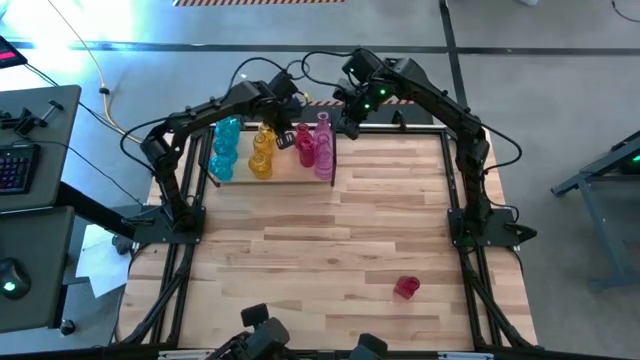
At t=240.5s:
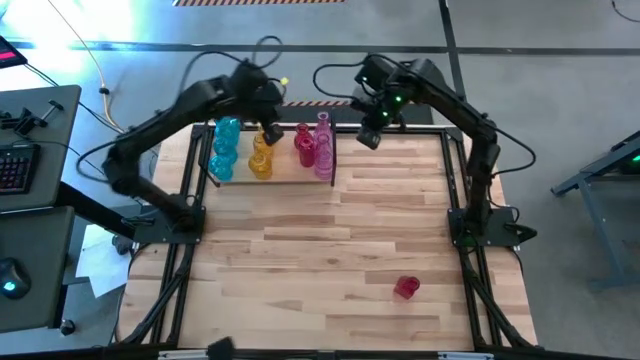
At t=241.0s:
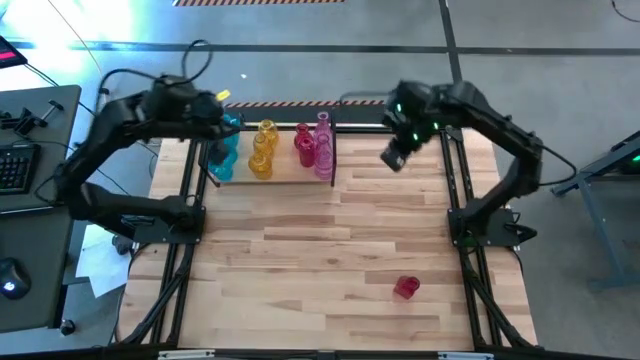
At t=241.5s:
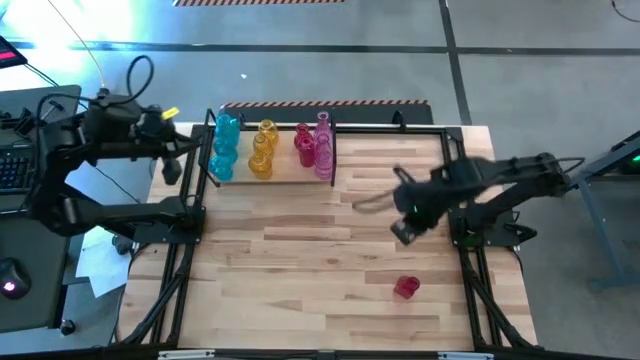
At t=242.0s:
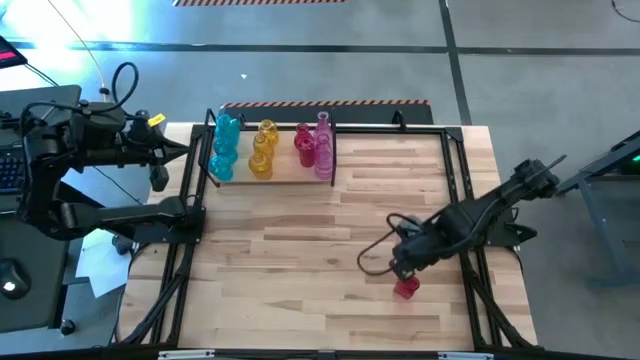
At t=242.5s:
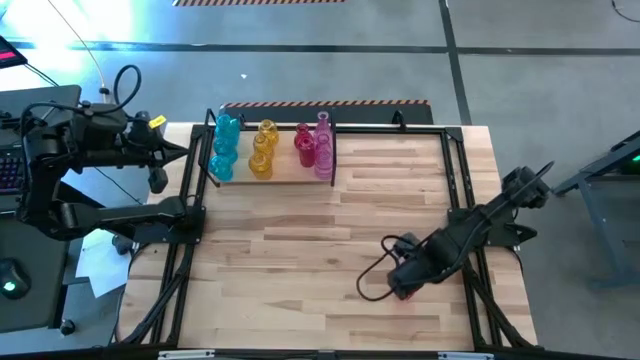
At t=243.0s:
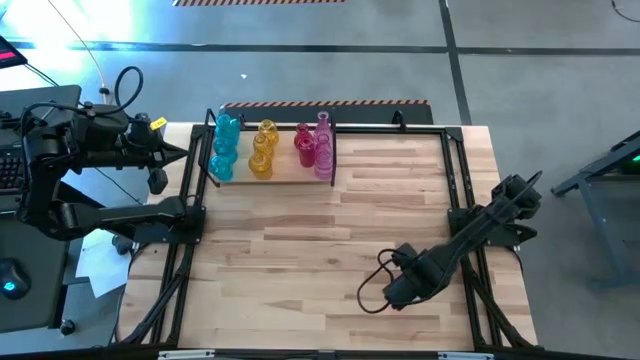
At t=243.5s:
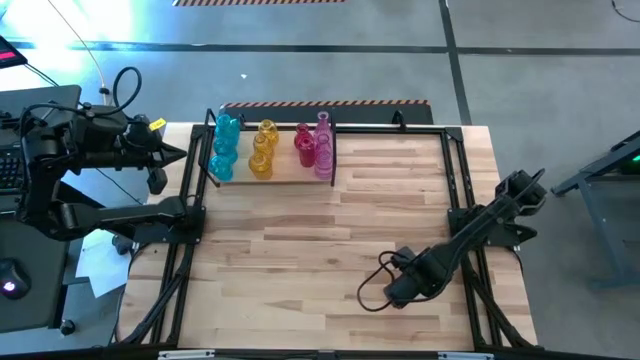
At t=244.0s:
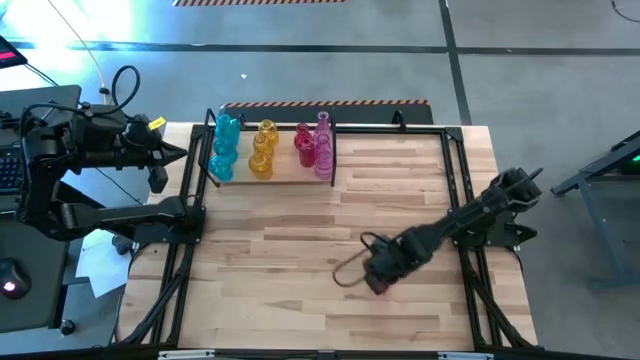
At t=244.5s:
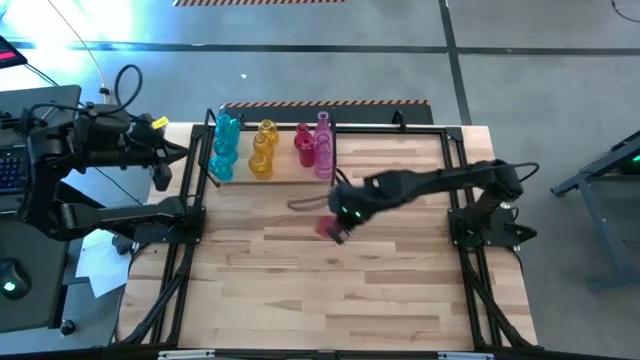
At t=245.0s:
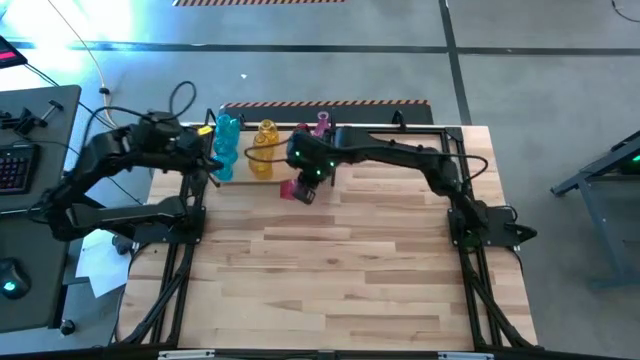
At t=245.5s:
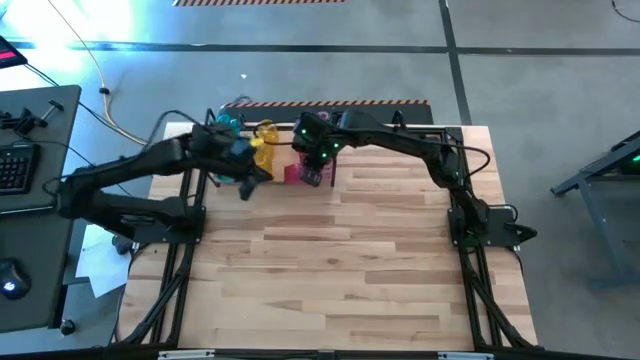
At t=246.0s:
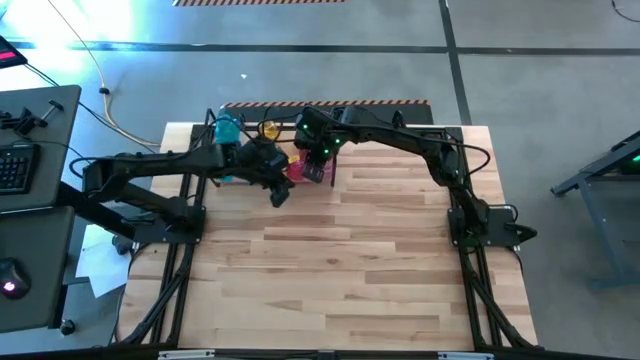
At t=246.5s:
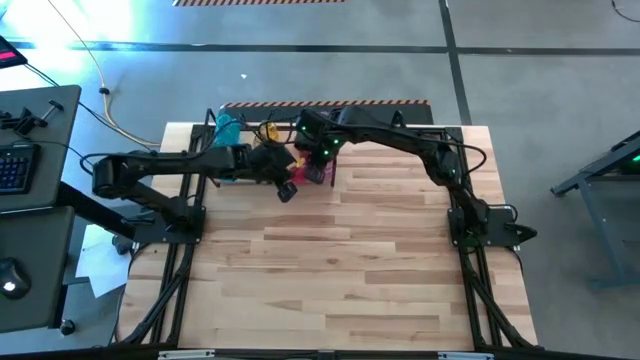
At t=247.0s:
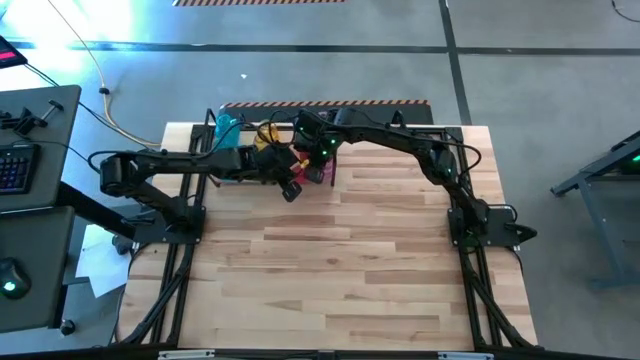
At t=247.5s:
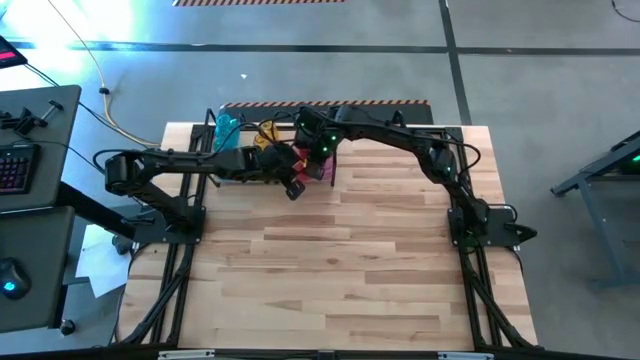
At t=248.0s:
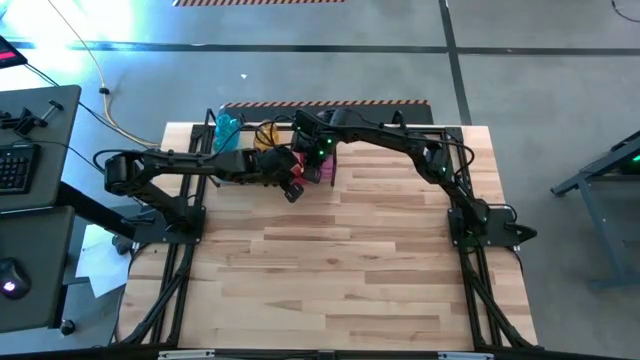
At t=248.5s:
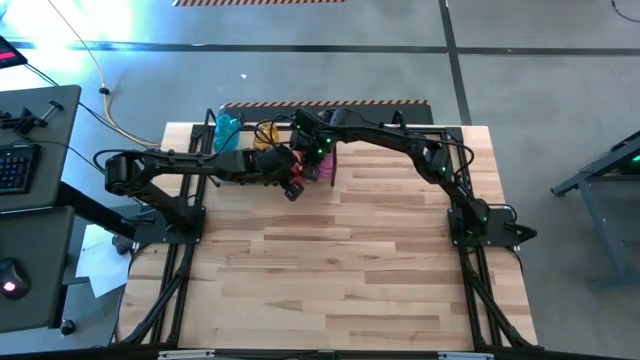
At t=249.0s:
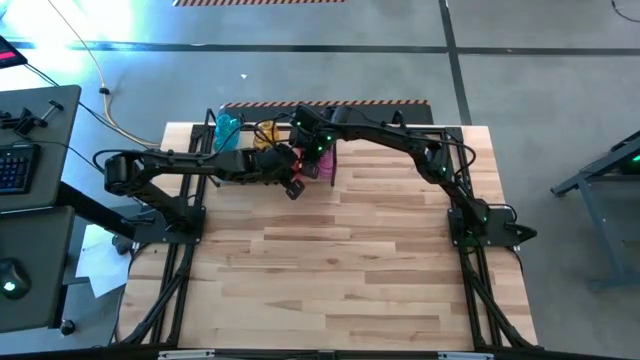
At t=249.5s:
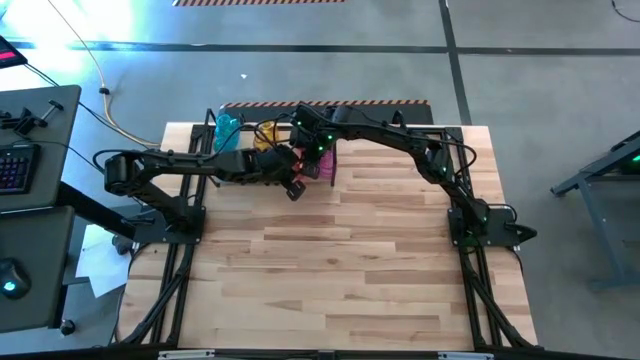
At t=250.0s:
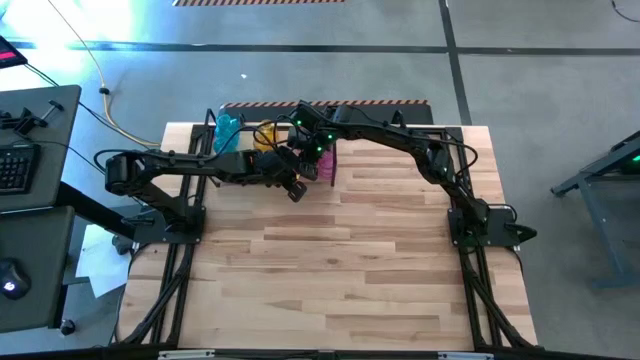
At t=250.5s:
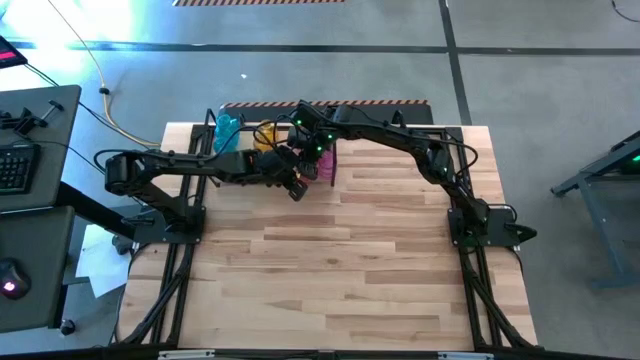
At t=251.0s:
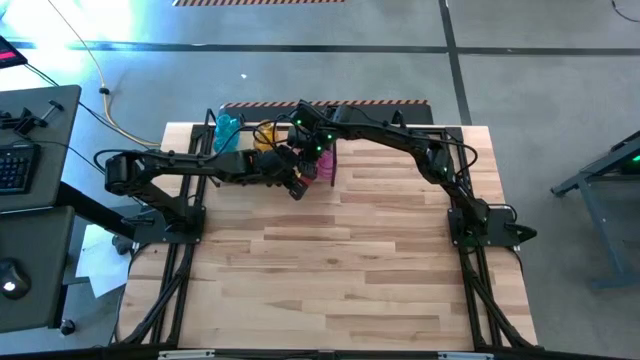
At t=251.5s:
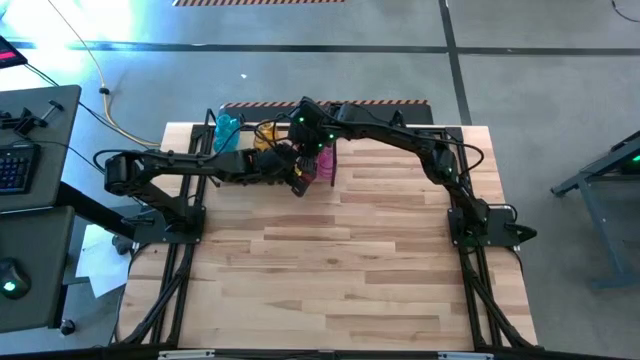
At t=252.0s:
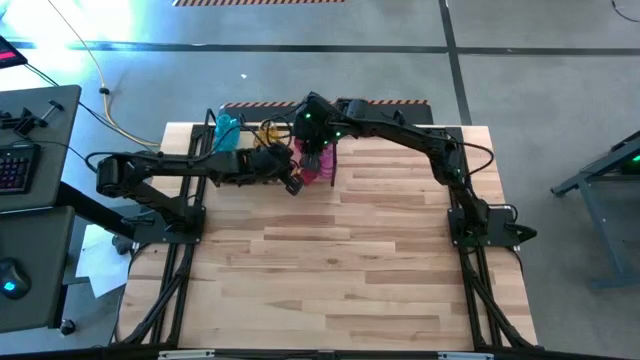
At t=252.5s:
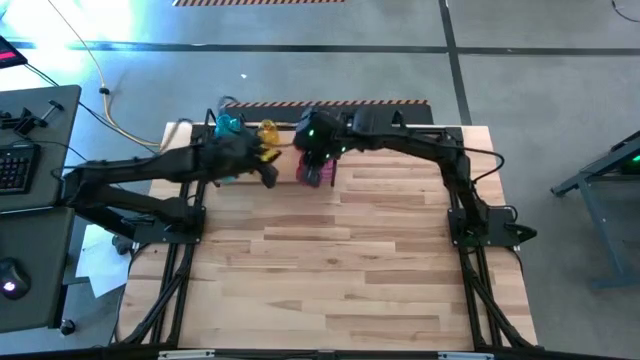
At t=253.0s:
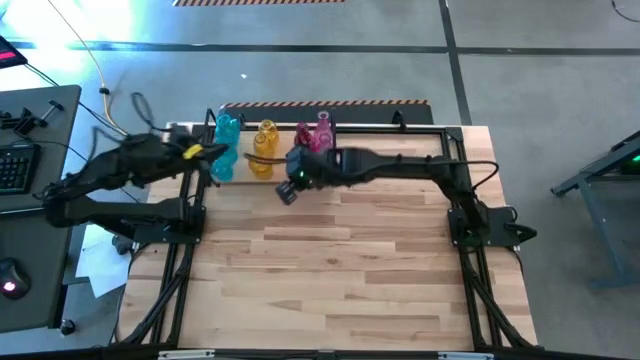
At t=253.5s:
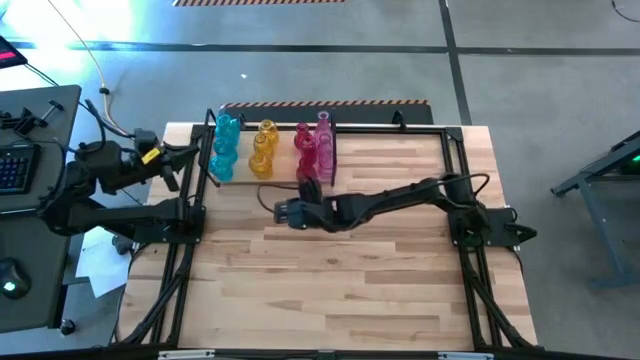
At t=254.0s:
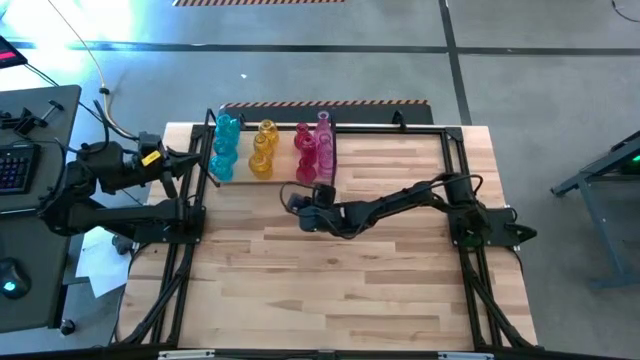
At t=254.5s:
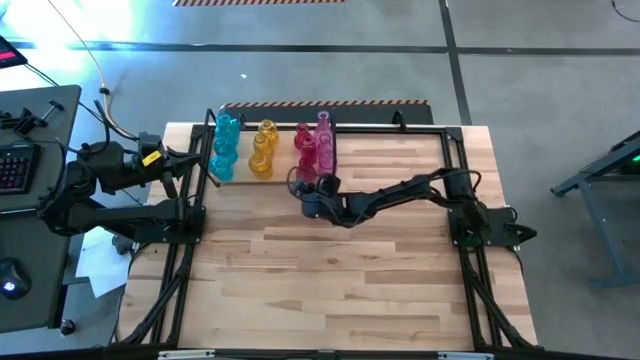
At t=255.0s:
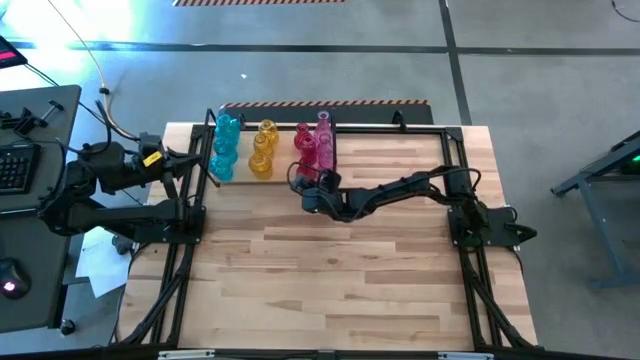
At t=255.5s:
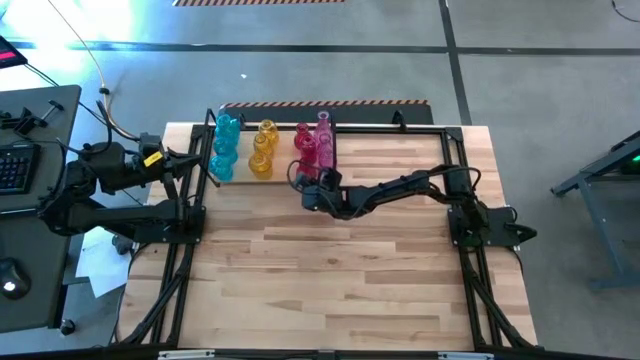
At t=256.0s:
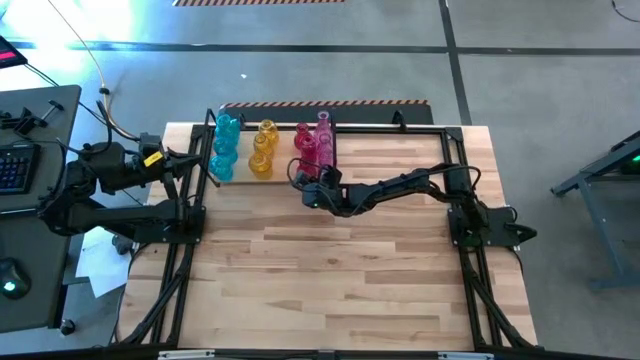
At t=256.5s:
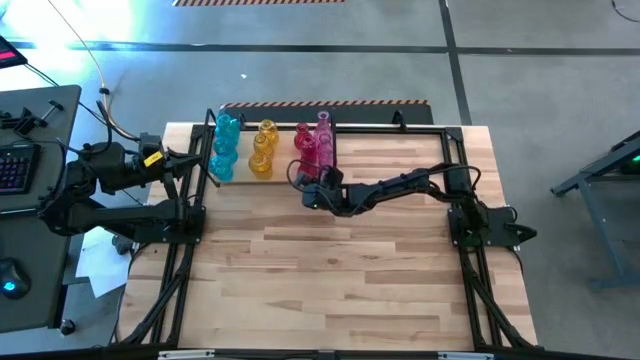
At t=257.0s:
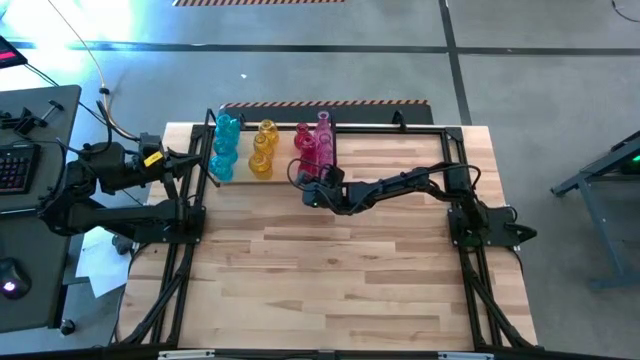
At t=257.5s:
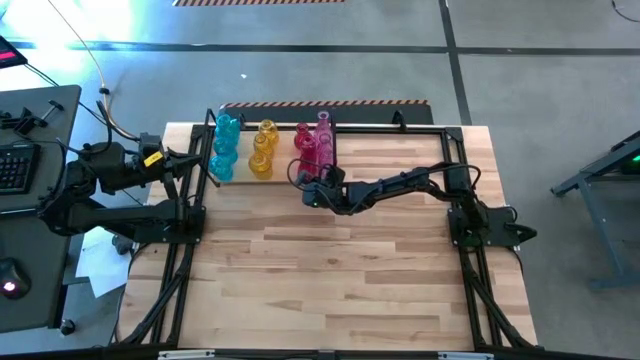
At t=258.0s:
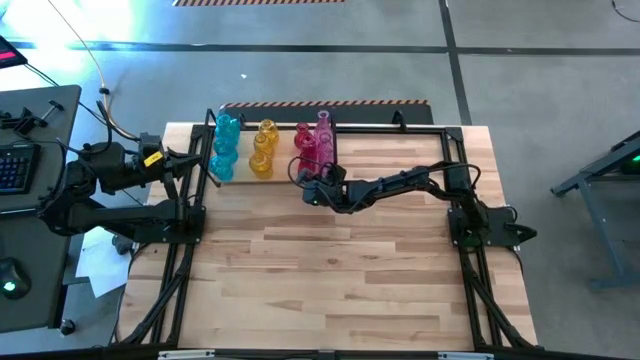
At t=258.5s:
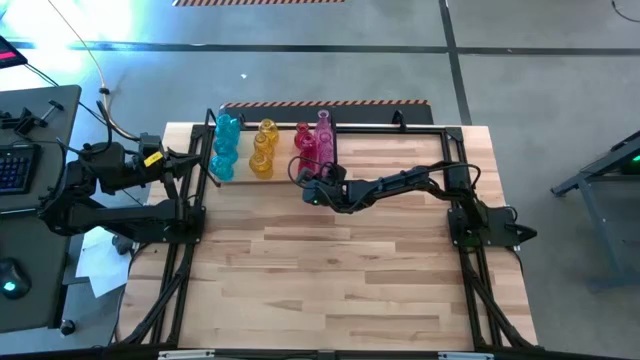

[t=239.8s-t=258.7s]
Task: sort vases onto shelf
Put the red vase on the shelf aligned with the other red vase

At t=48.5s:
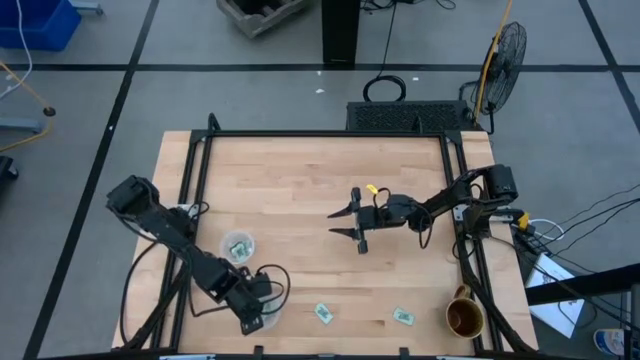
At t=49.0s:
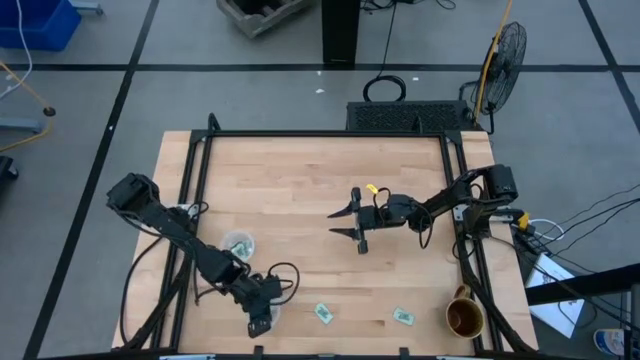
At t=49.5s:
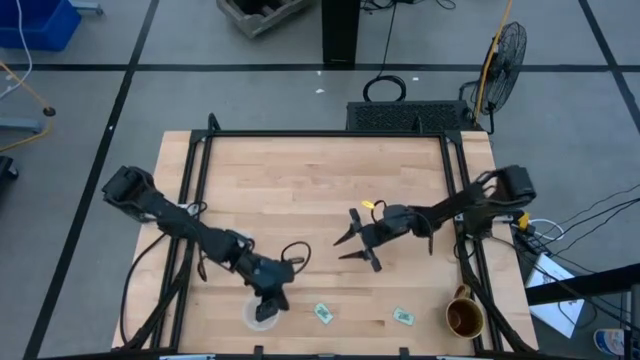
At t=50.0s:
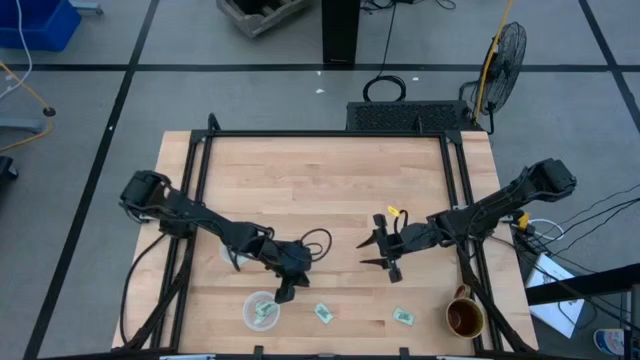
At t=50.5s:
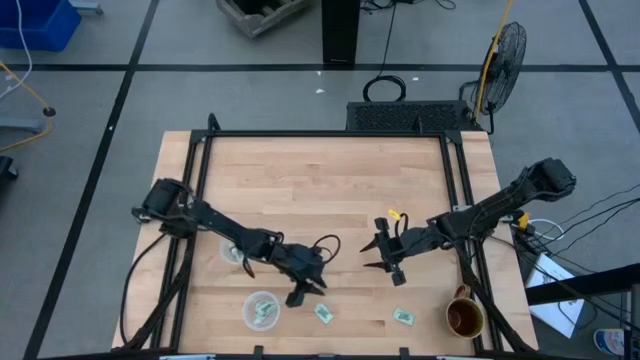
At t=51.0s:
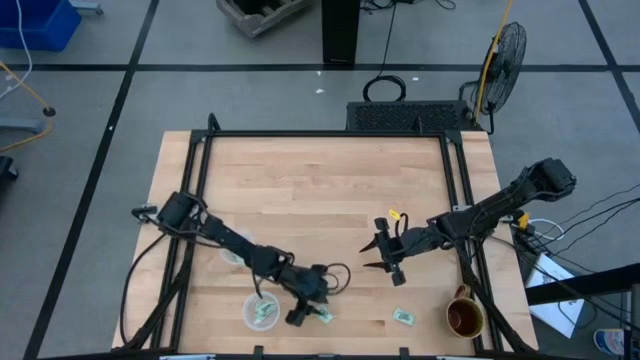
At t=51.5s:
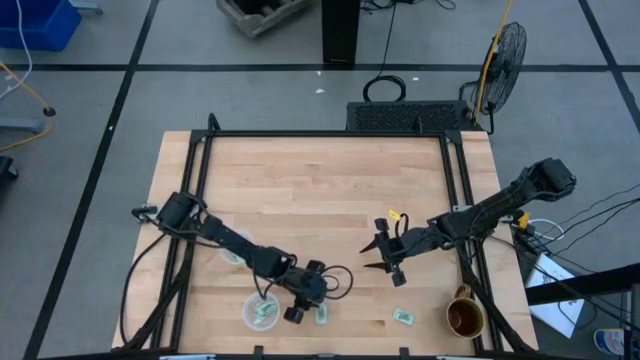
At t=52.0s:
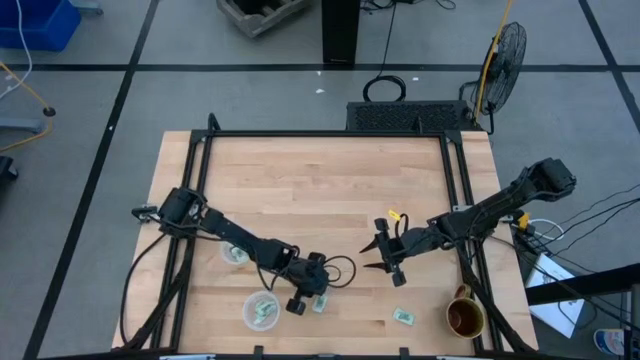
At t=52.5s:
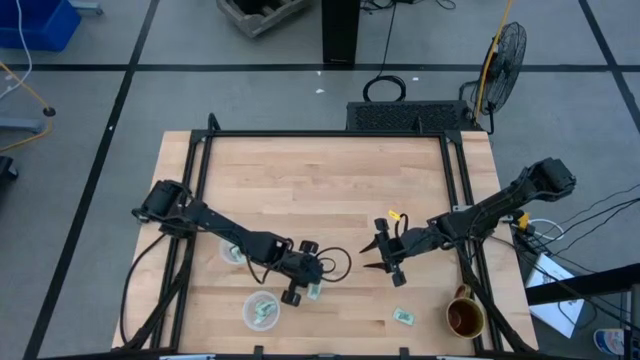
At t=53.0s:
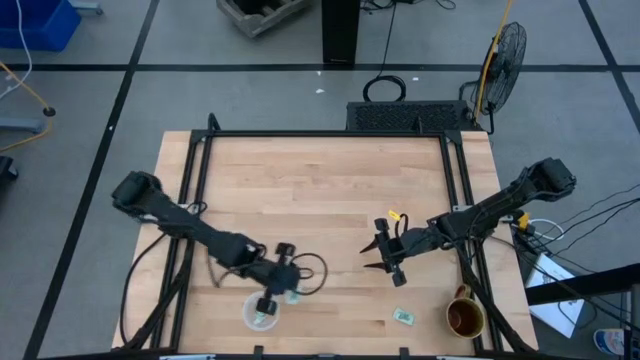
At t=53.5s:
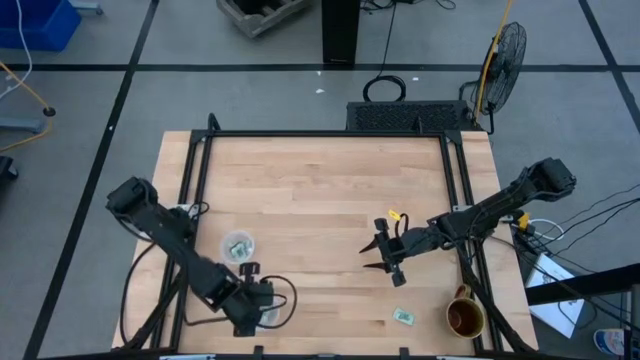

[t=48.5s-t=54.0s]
Task: Pick and place Stevia / Truvia into bins
Put the stevia packet into the bottom container
